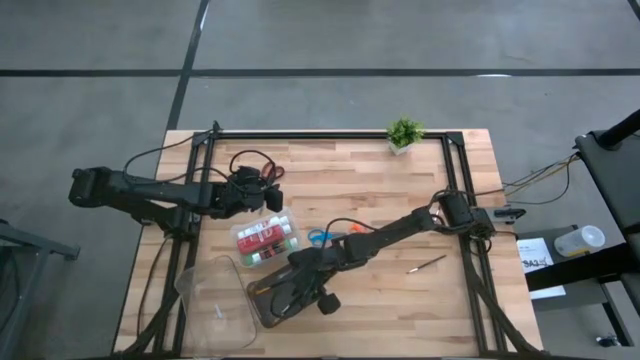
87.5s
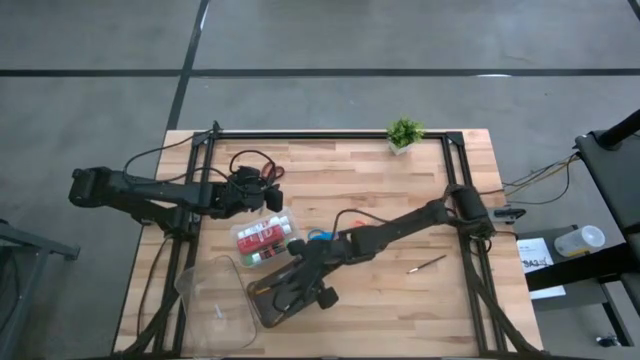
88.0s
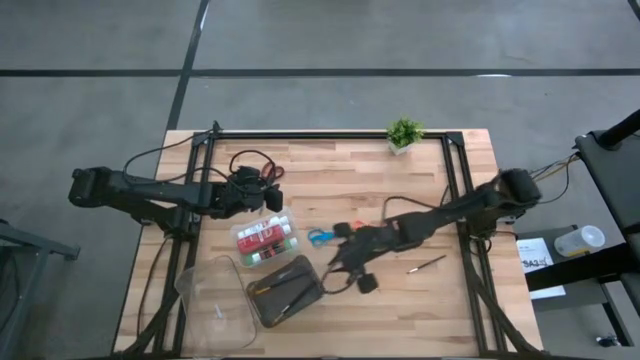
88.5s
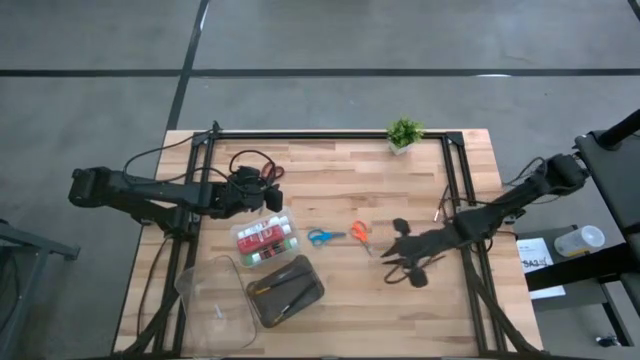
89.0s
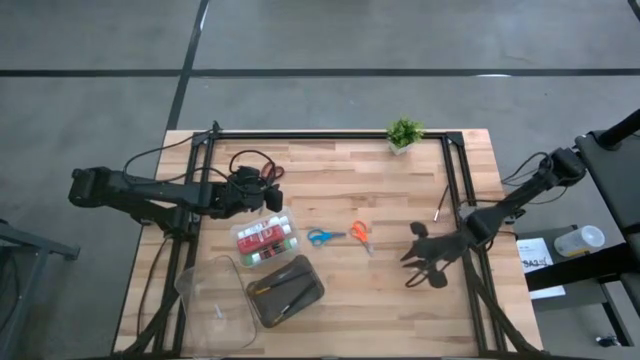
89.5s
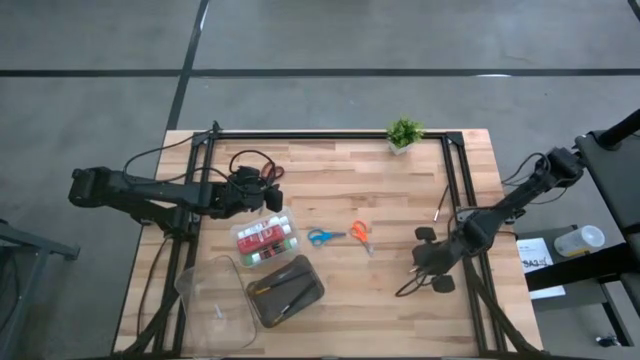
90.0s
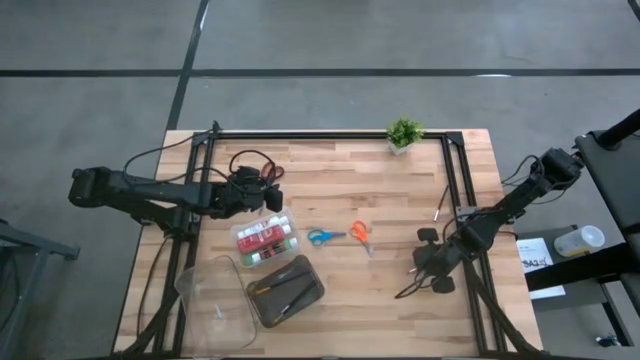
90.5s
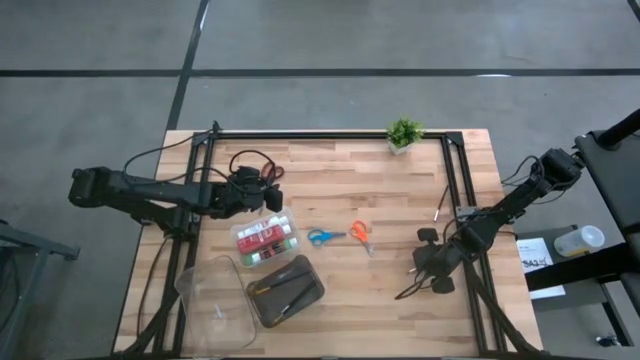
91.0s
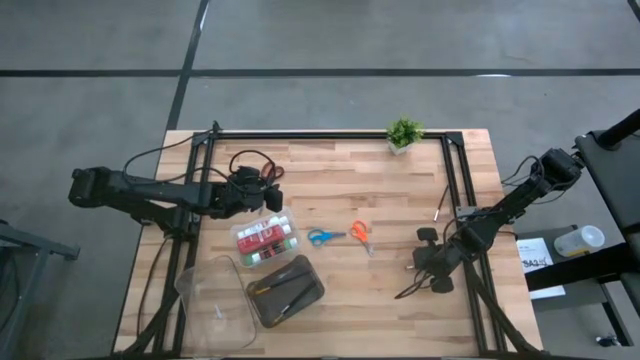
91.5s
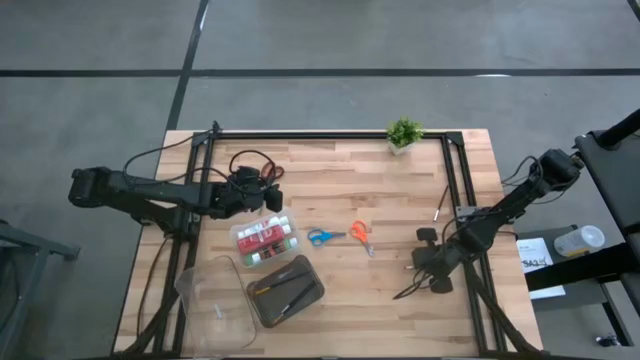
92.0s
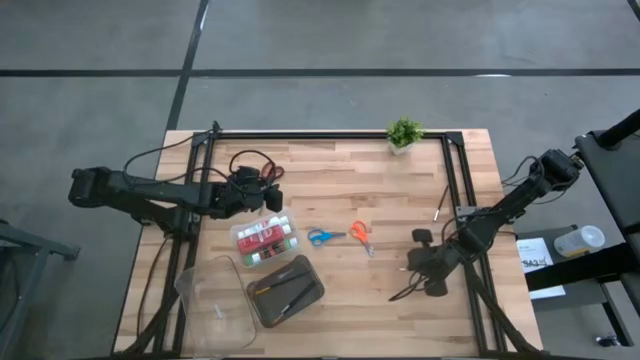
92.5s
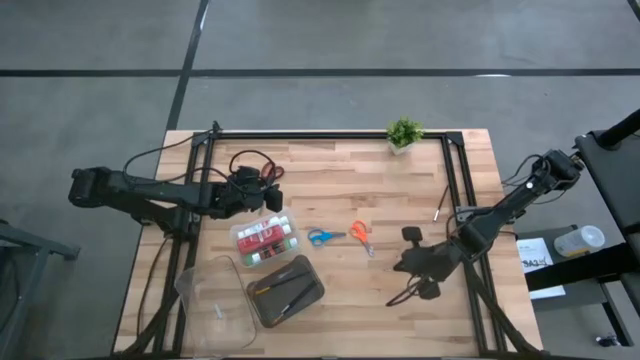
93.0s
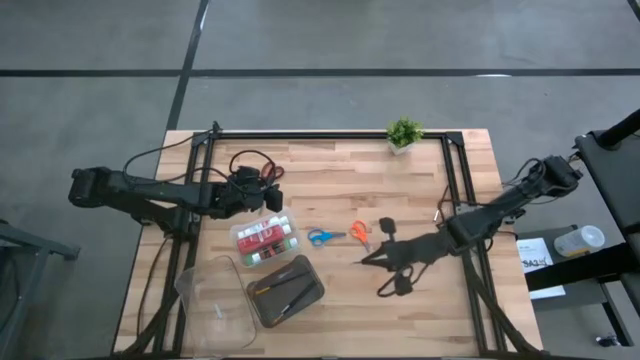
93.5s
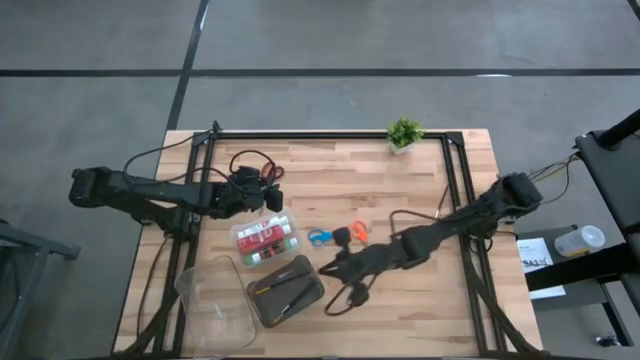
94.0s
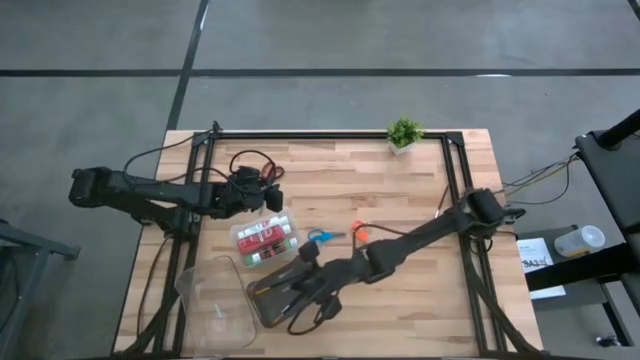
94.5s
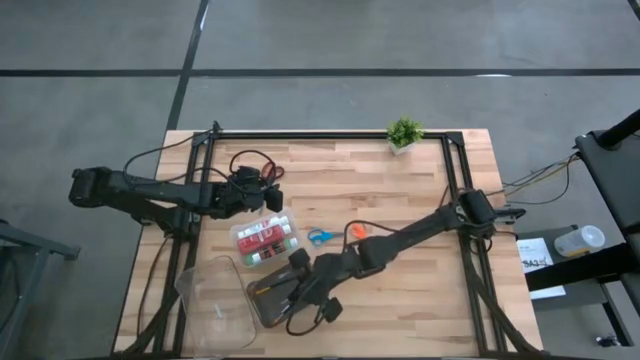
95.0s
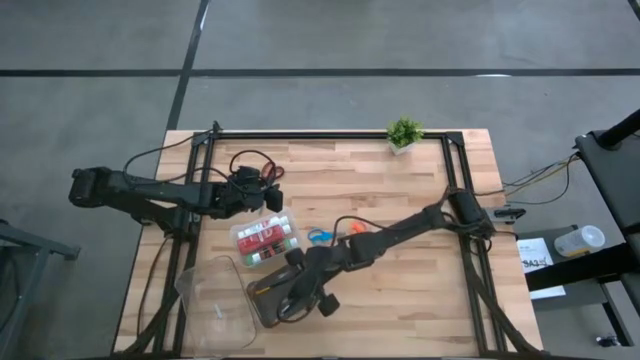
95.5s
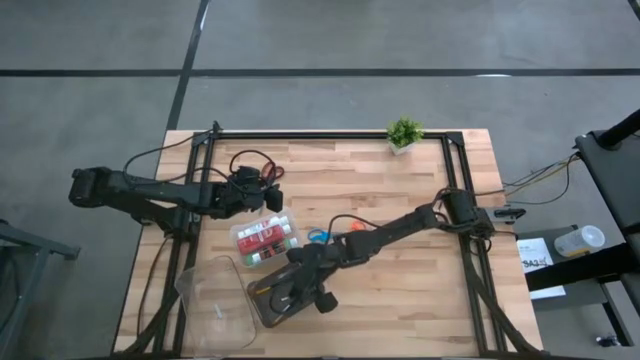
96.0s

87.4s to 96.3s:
Task: Pick & Place Paint Supplies
Put the bottom silver paint brush into the black transparent bin

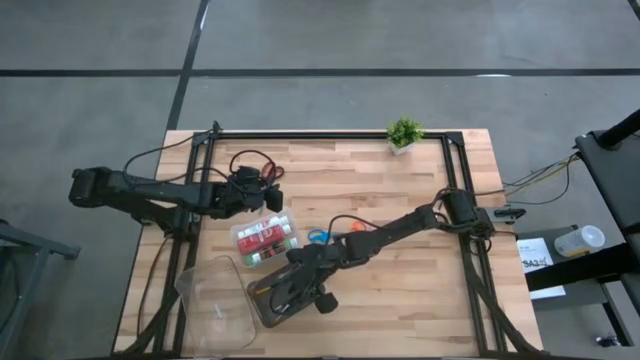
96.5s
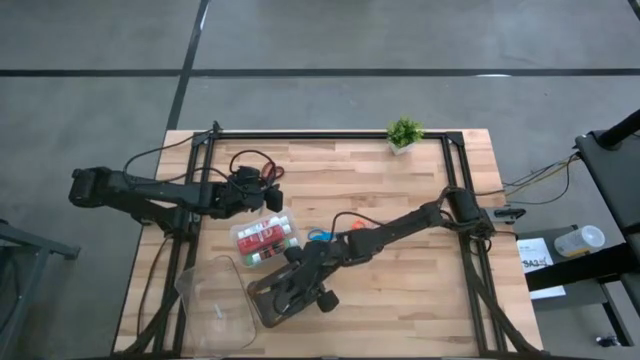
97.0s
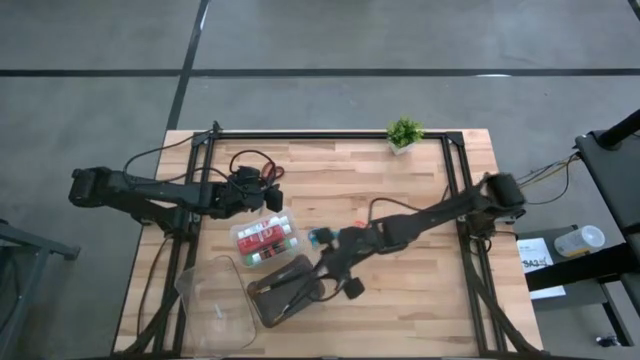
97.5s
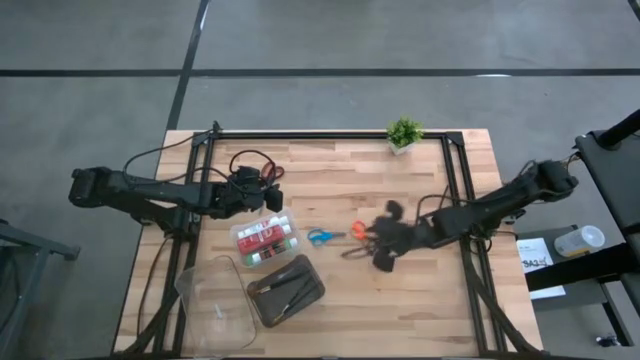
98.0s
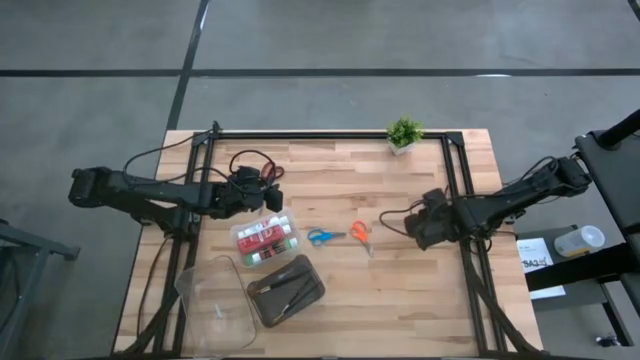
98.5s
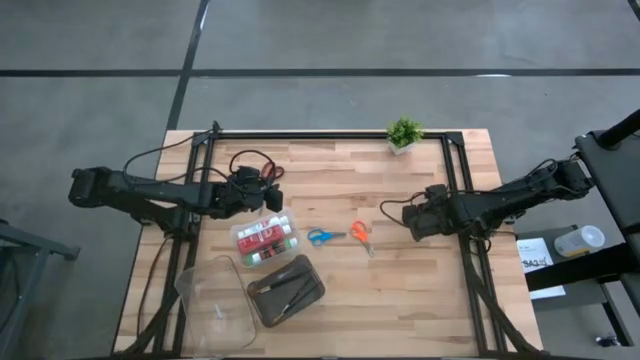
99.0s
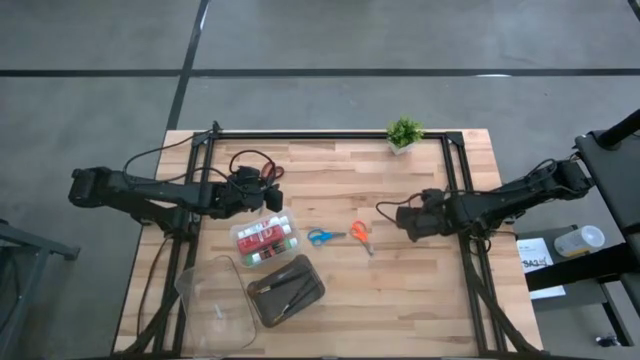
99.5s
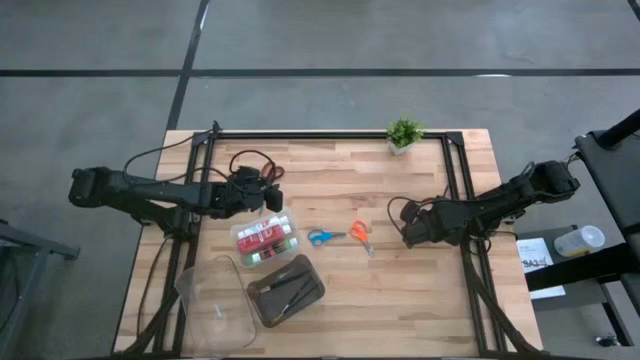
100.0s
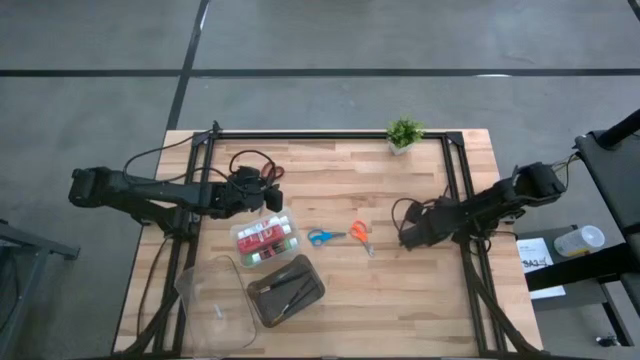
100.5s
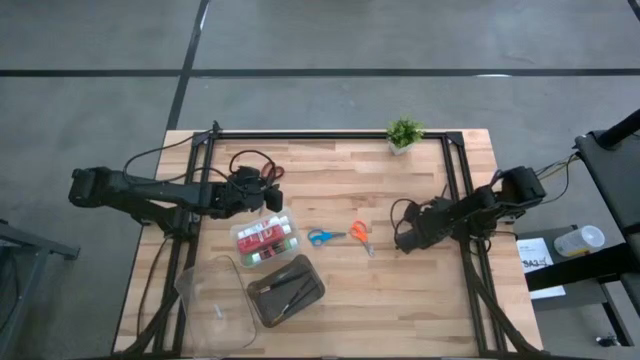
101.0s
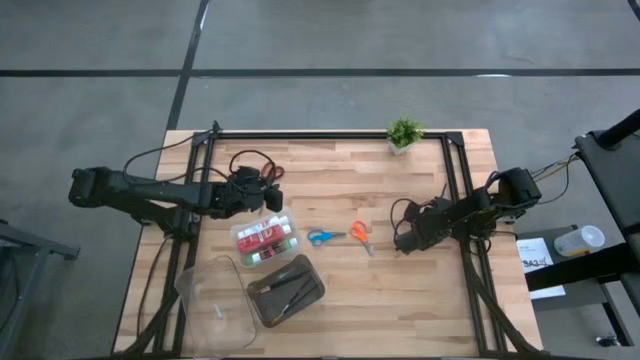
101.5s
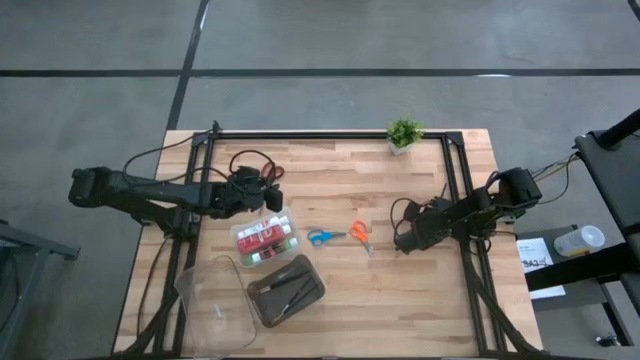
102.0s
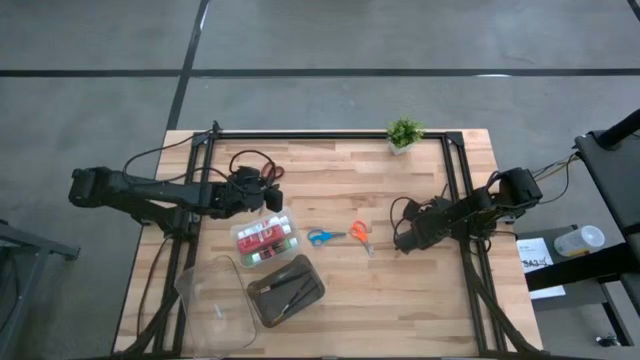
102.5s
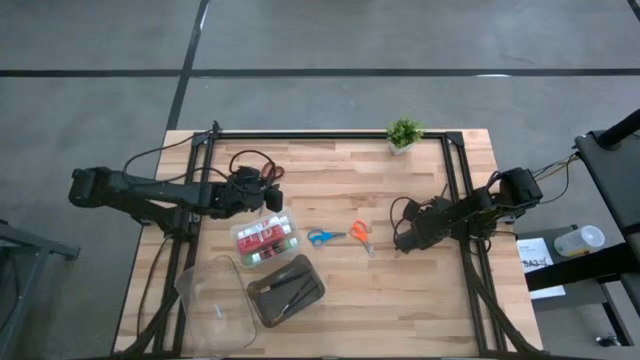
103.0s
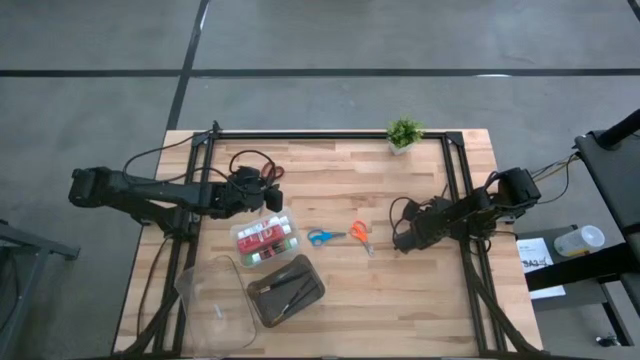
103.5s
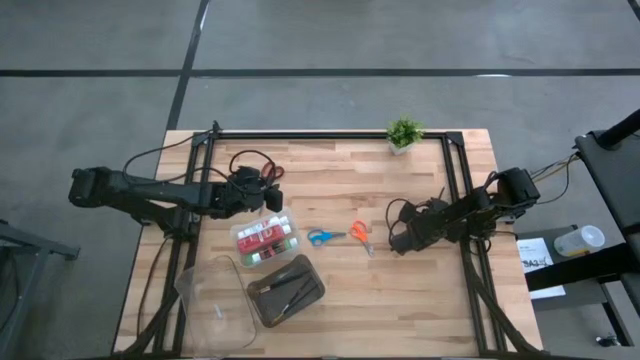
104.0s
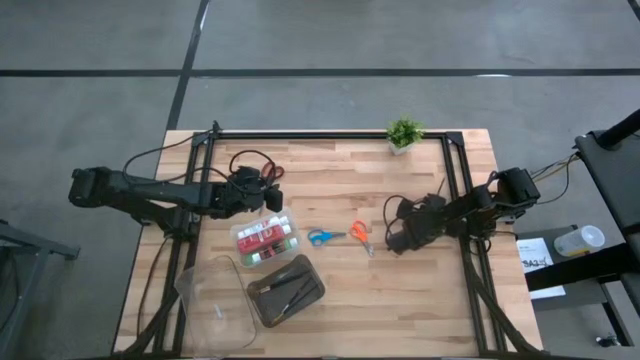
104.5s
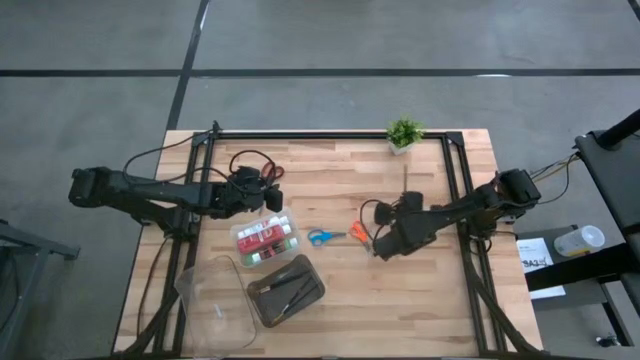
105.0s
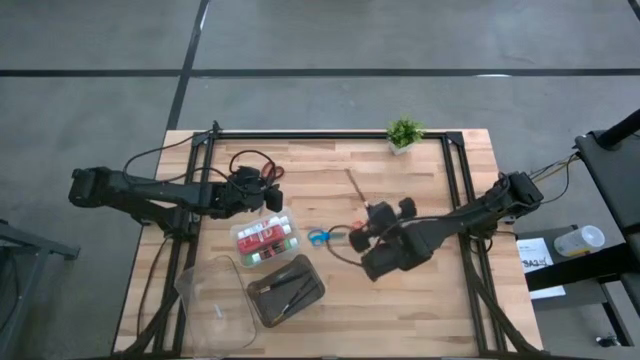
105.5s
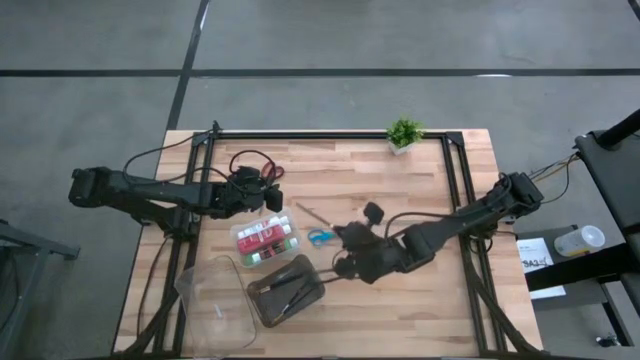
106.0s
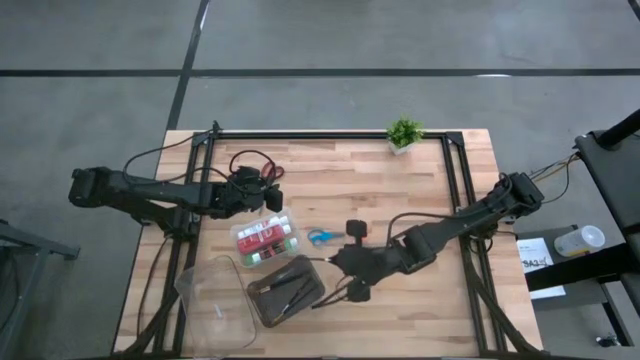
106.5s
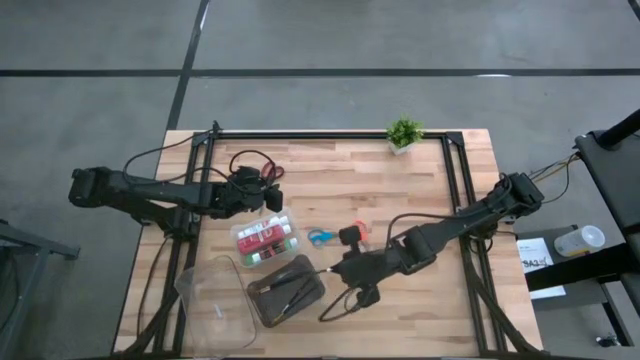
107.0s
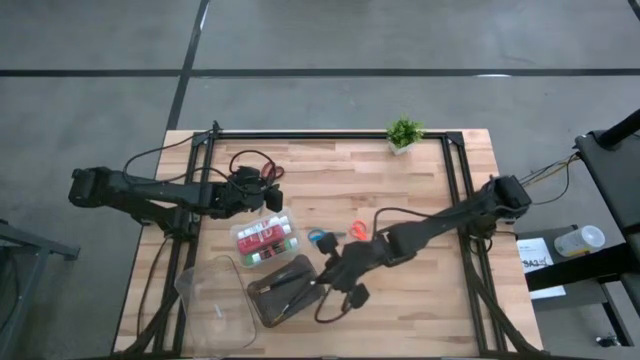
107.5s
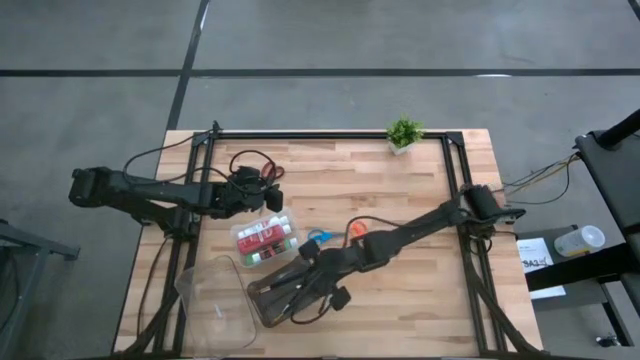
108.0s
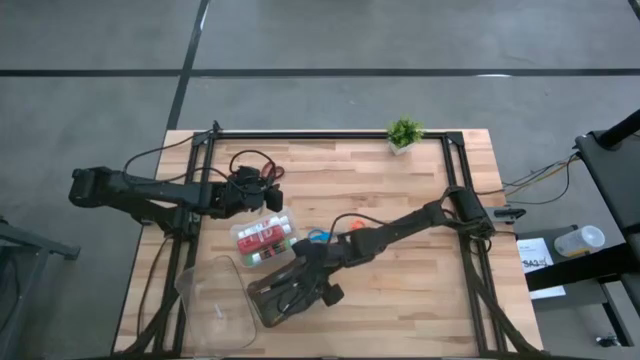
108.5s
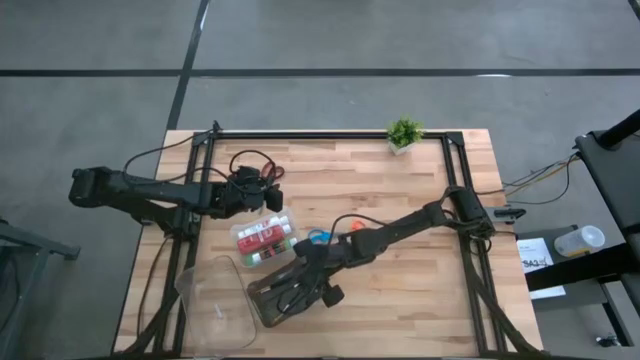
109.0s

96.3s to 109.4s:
Put the silver paint brush into the black transparent bin
